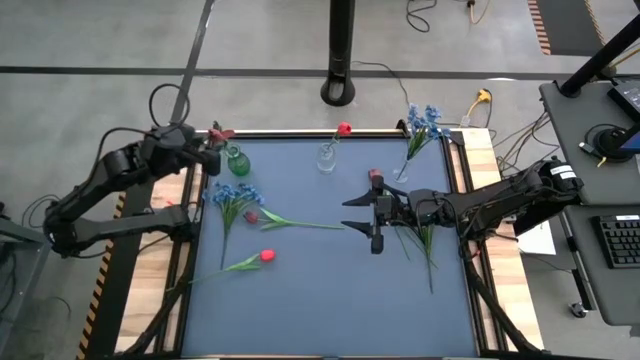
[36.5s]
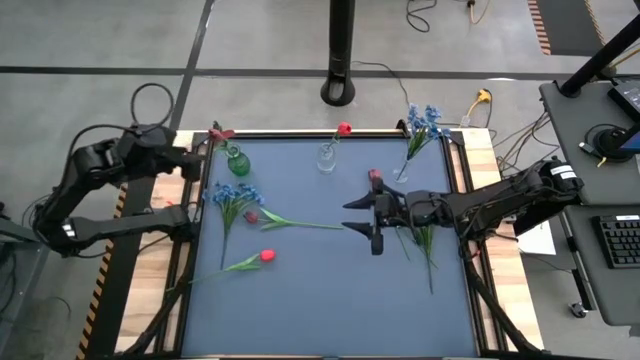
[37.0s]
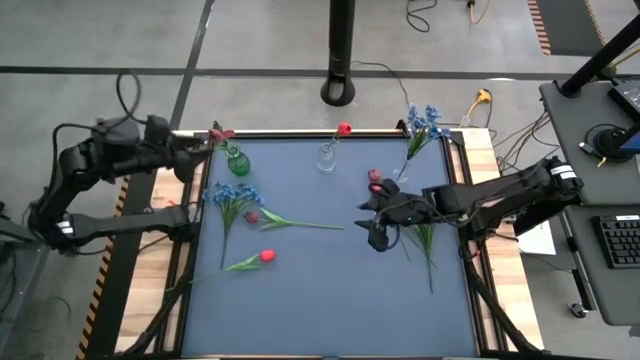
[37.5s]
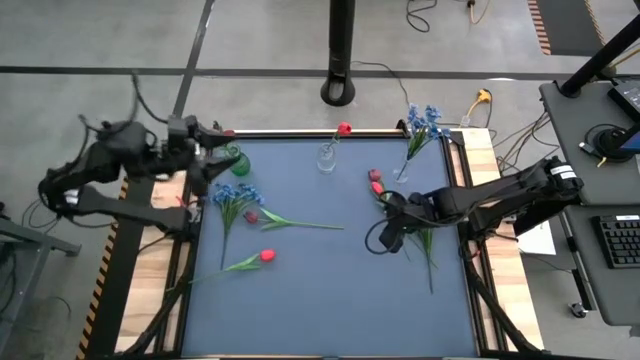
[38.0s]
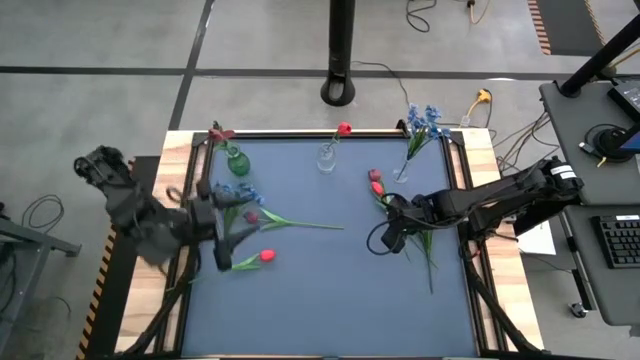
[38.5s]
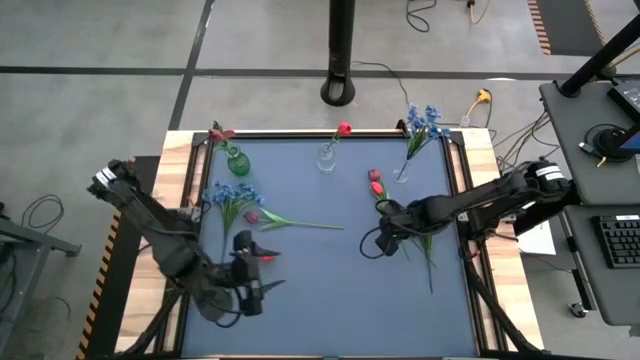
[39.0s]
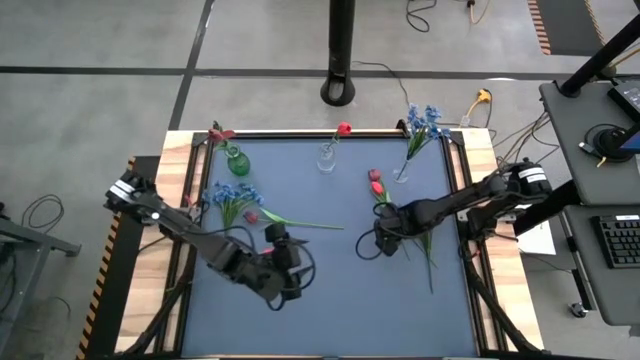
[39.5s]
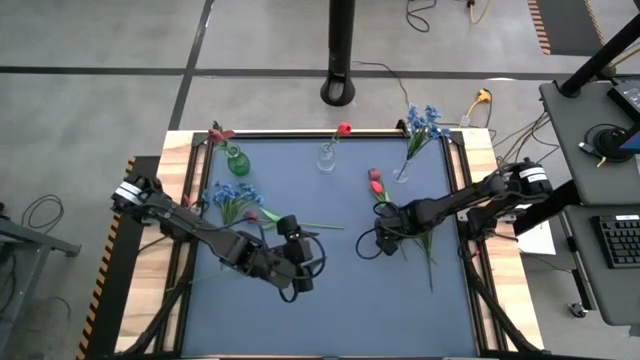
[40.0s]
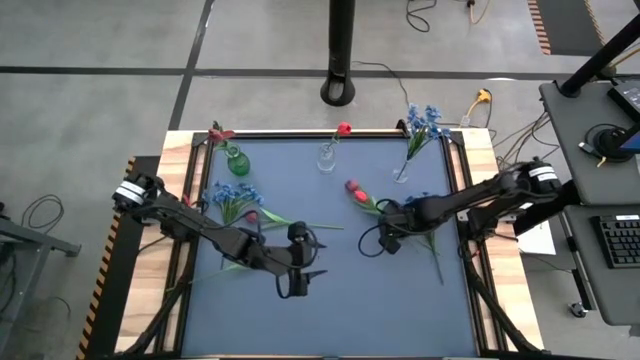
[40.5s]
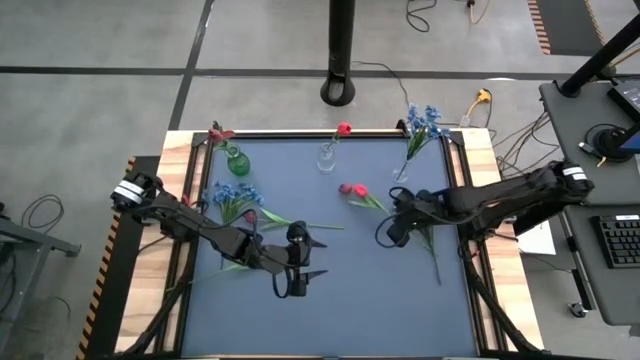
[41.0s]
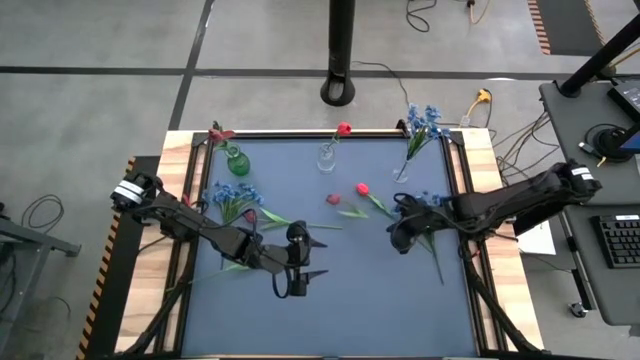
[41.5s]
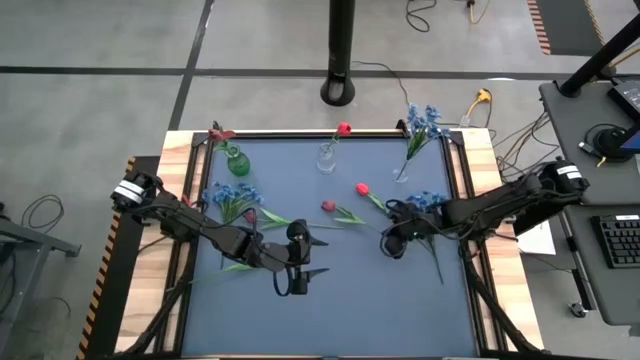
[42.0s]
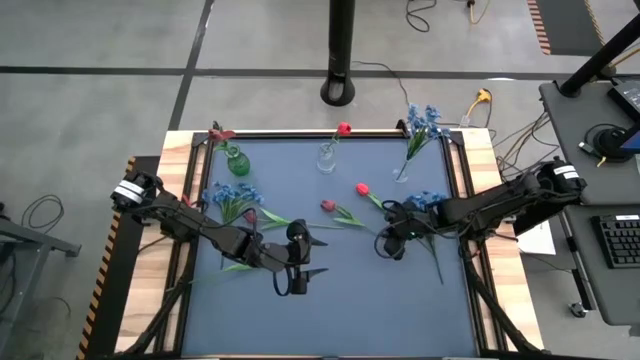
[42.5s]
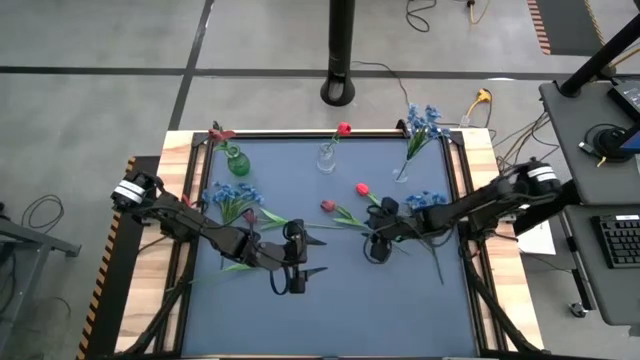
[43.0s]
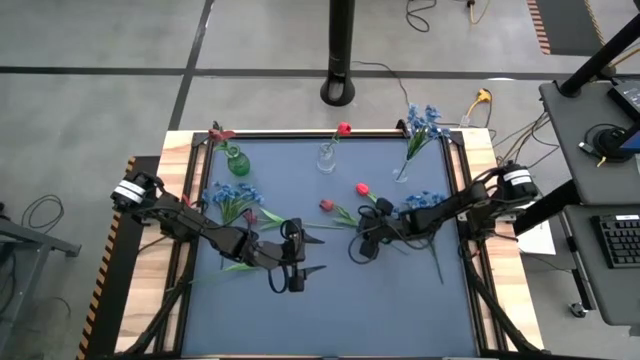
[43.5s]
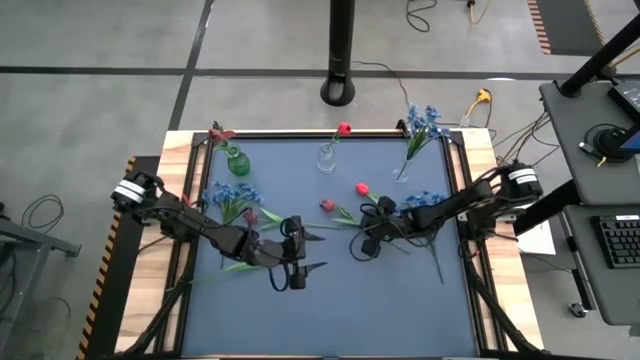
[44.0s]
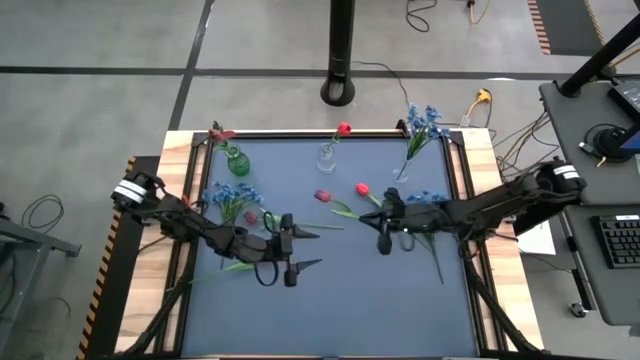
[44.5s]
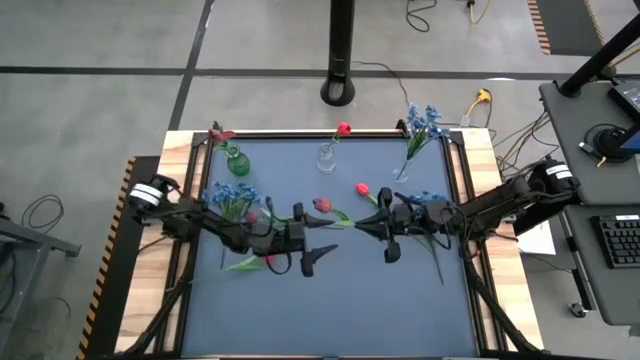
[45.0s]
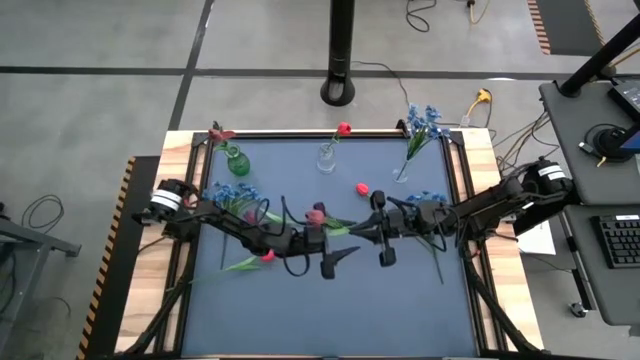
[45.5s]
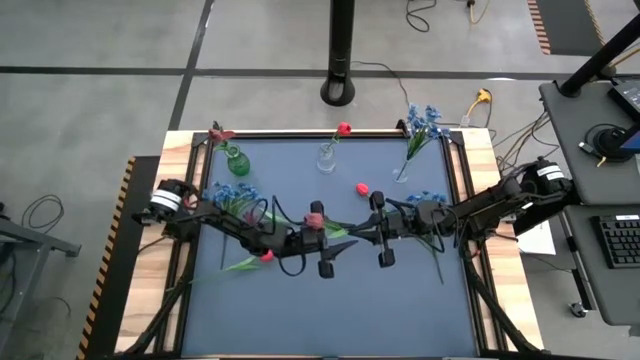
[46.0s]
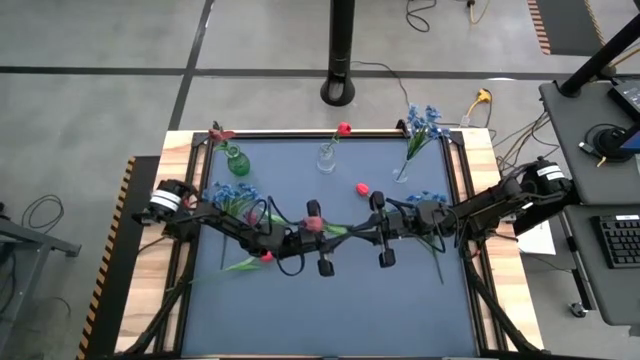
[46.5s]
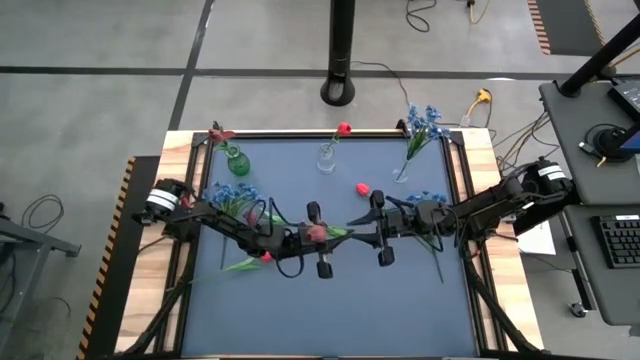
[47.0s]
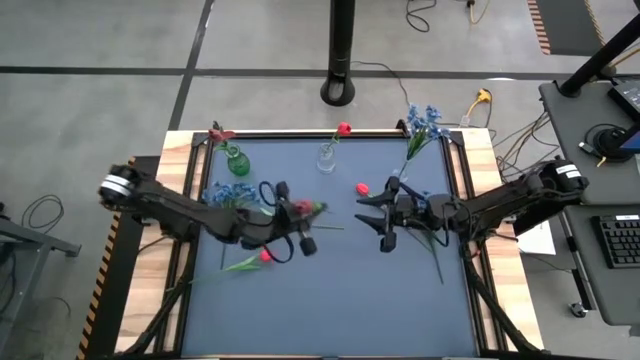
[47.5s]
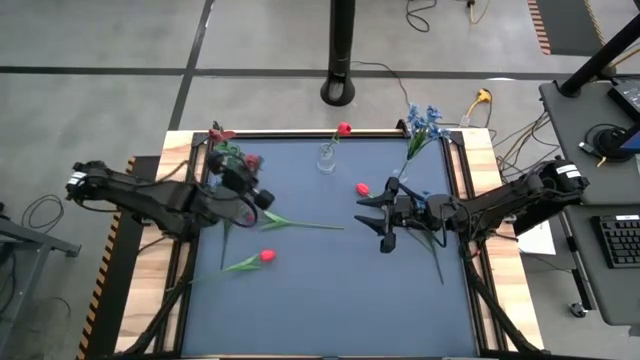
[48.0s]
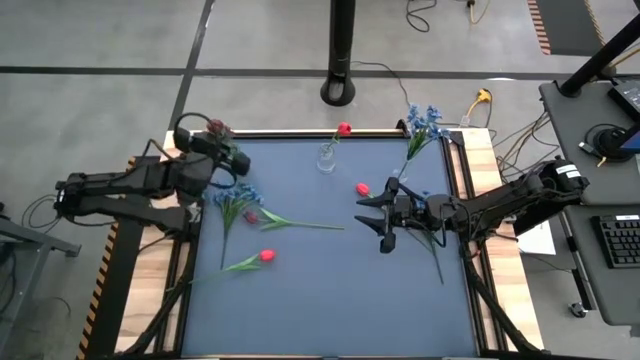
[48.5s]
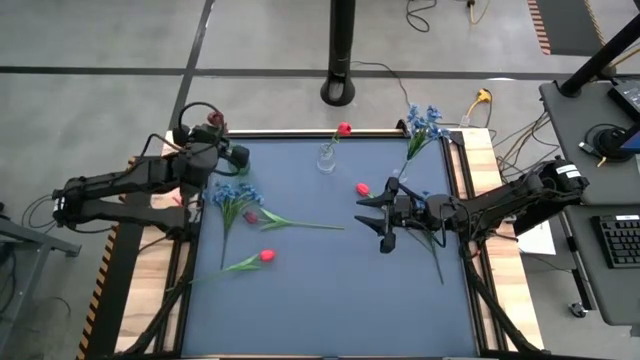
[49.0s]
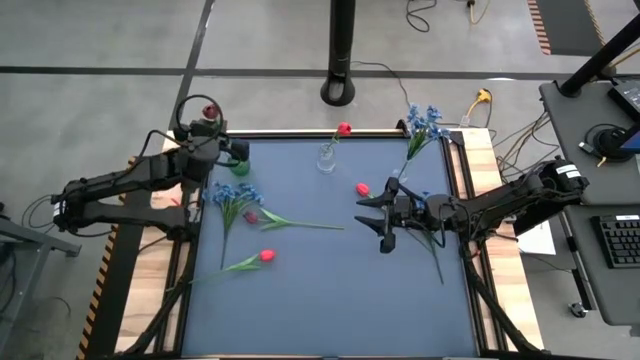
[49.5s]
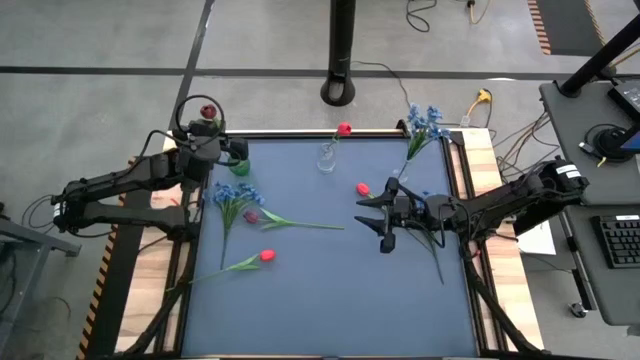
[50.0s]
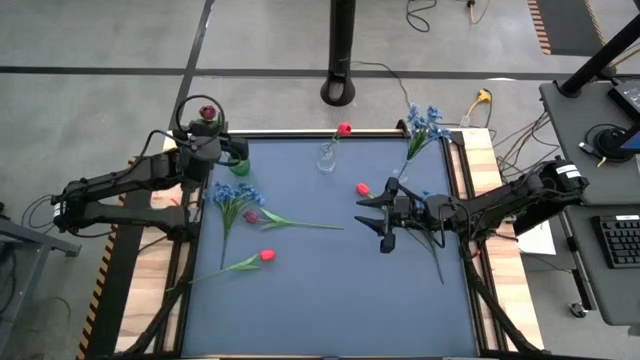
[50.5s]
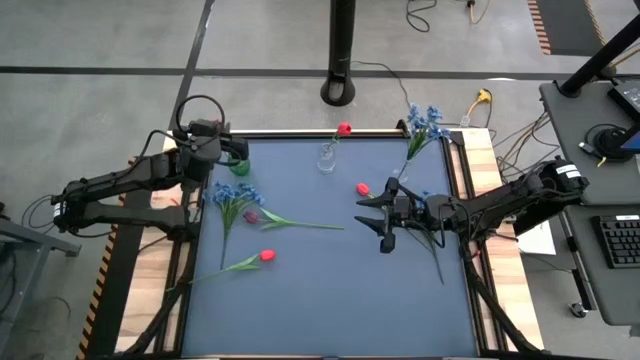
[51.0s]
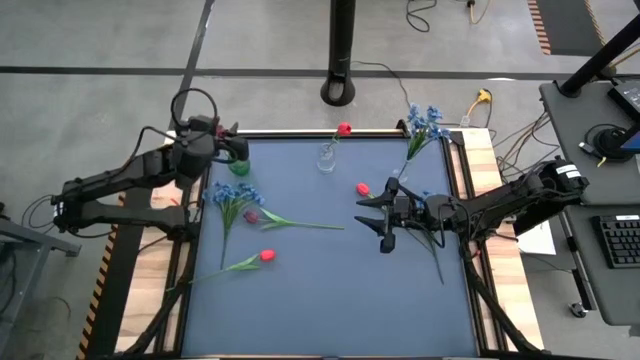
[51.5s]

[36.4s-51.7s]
Task: Sort flowers into vase by color
Put the right dark red flower into the green vase

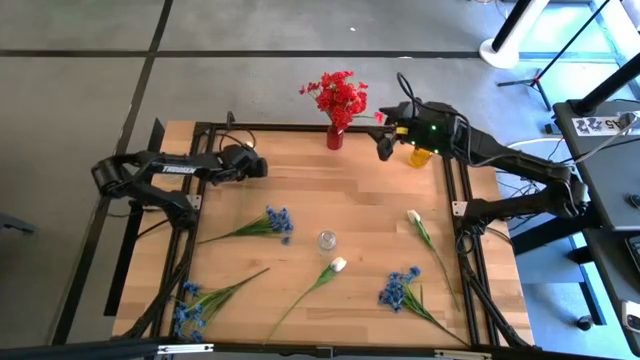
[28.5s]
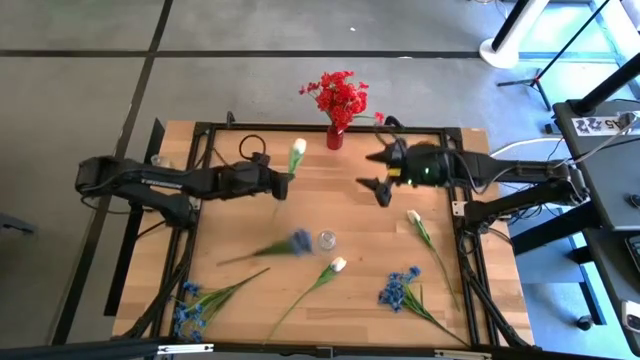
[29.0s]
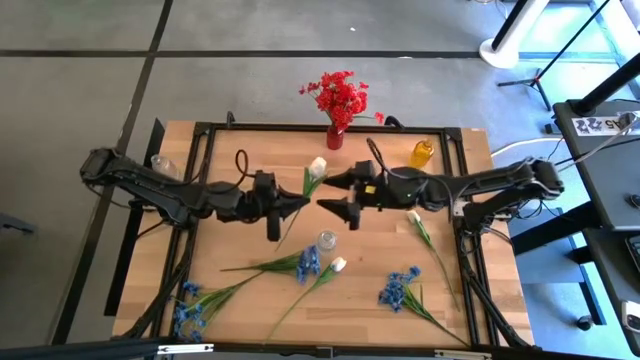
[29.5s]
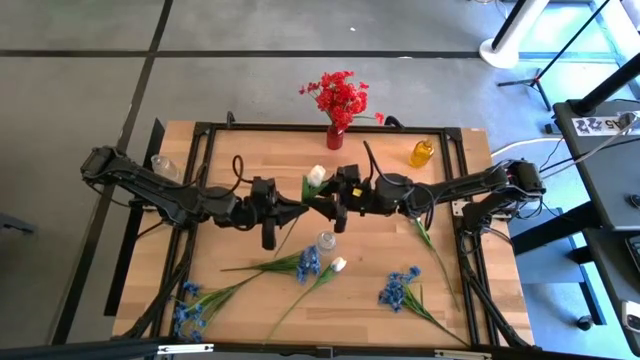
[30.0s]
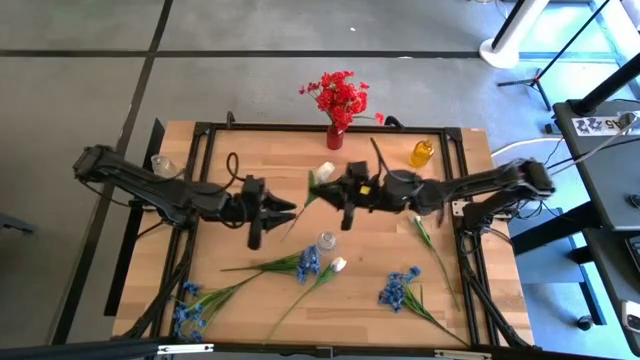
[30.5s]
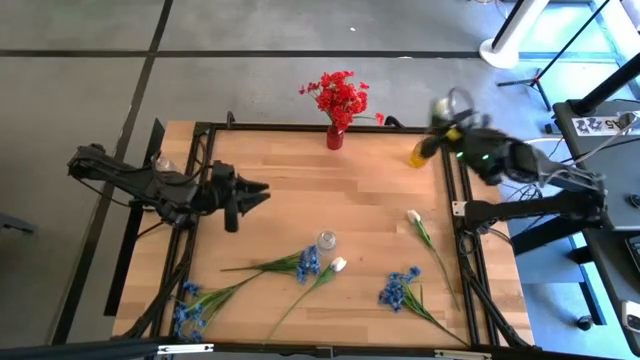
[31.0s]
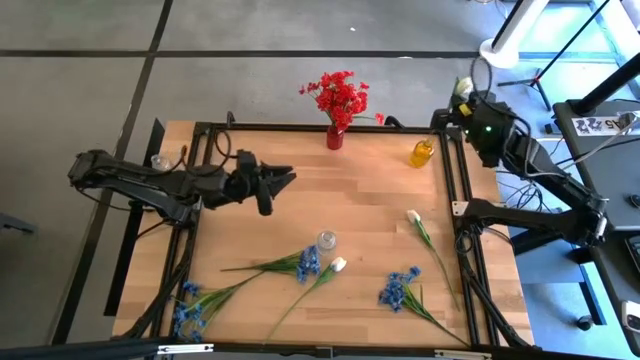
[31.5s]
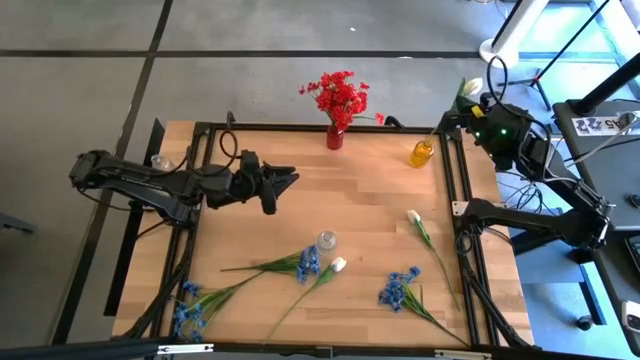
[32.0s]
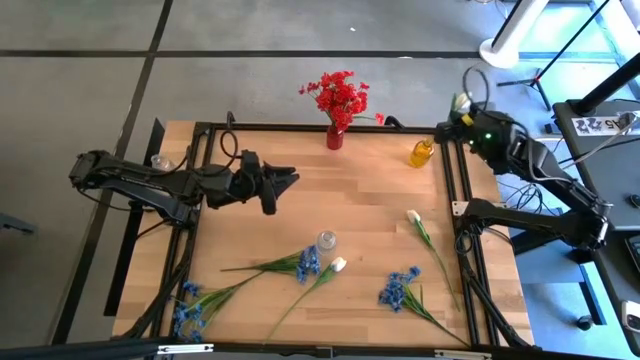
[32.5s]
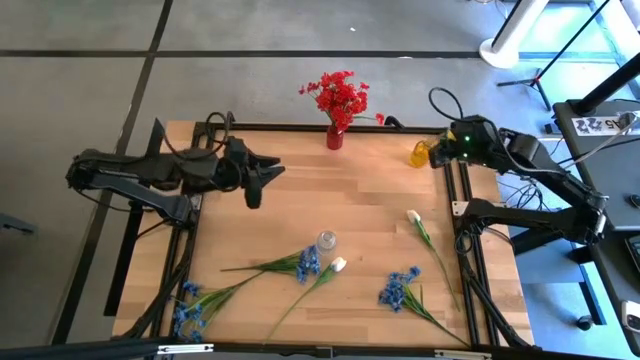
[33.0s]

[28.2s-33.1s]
Task: Sort flowers into vase by color
Put the left white flower into the yellow vase

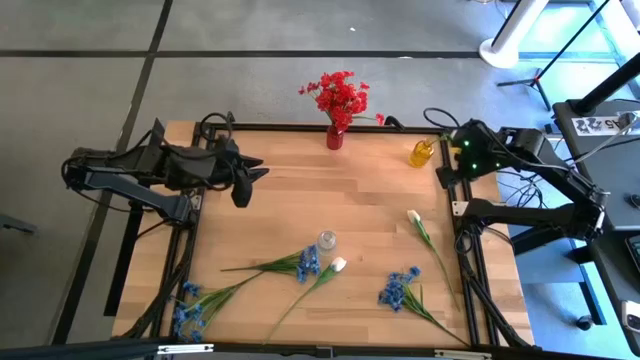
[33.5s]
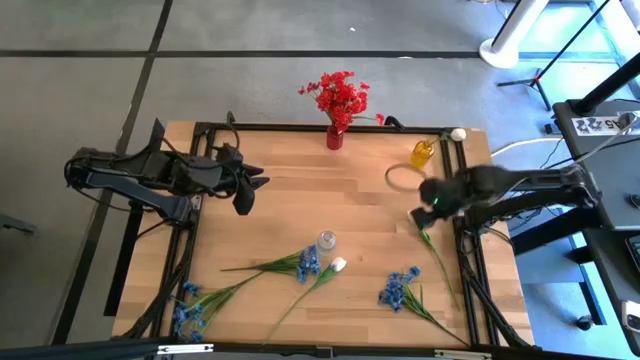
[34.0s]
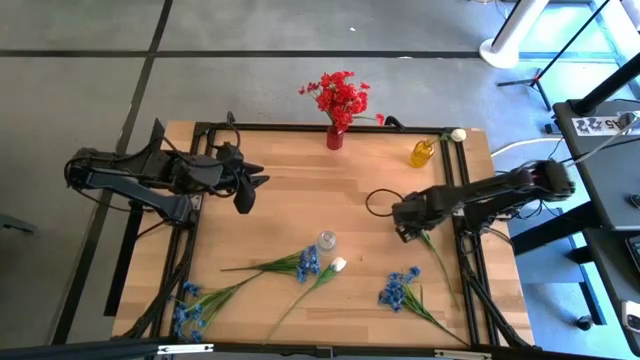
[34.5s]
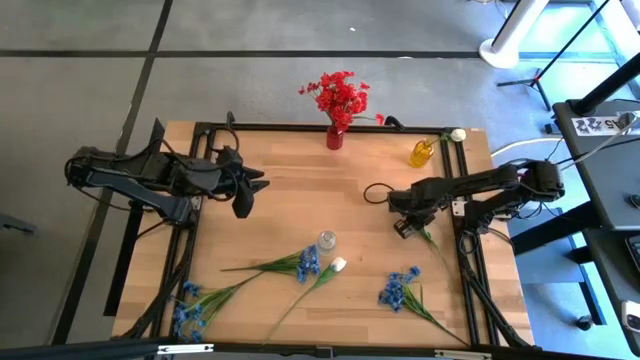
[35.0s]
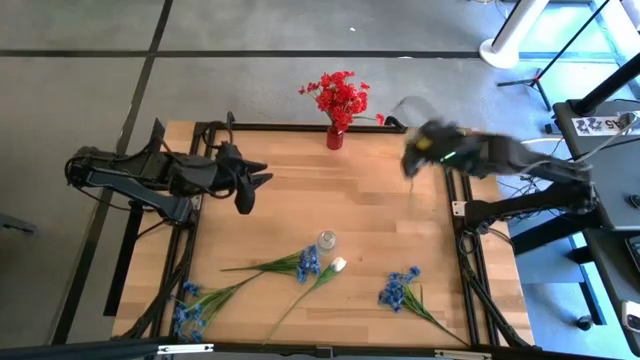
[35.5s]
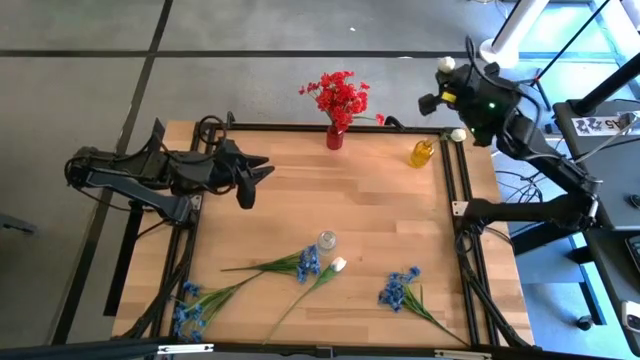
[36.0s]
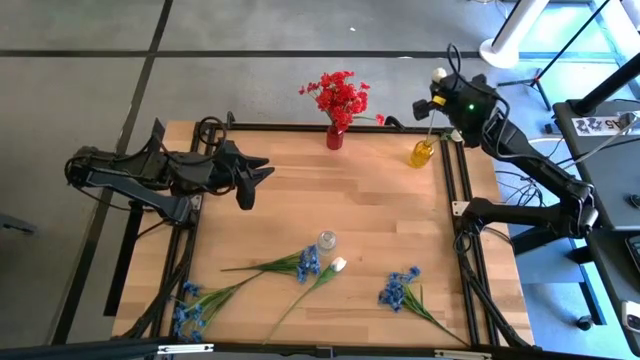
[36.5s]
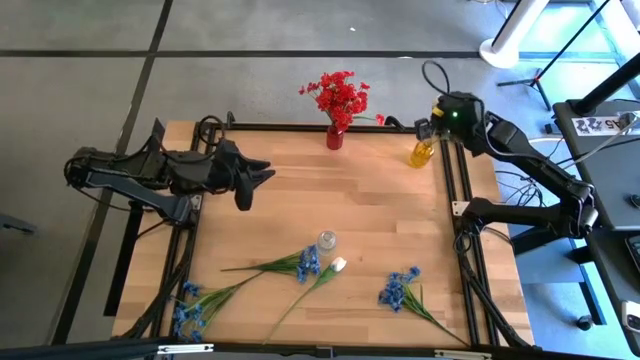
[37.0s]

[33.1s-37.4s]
Put the right white flower into the yellow vase
